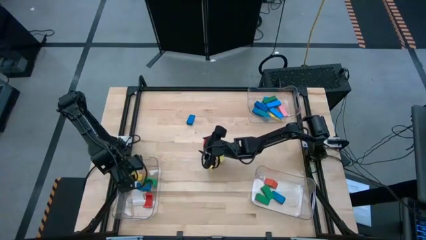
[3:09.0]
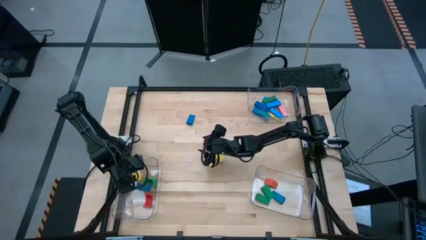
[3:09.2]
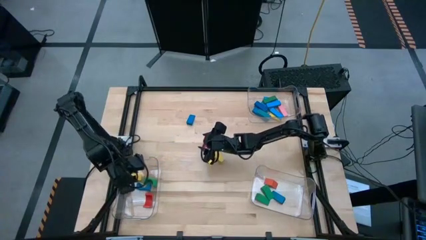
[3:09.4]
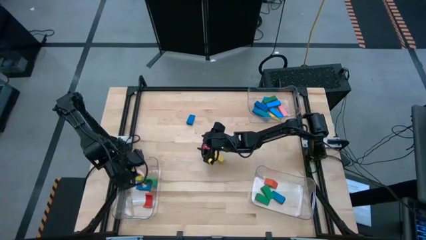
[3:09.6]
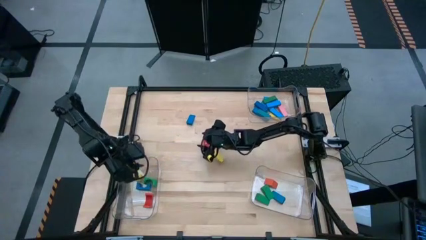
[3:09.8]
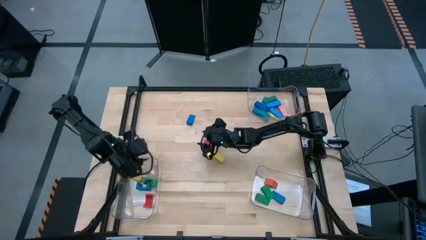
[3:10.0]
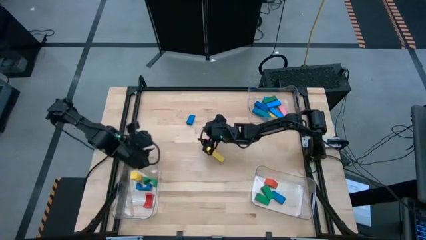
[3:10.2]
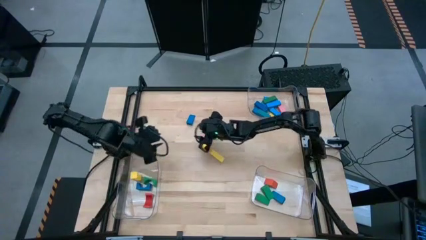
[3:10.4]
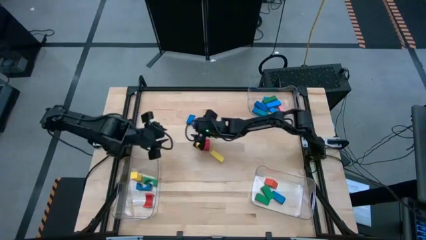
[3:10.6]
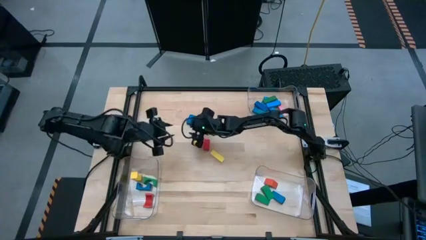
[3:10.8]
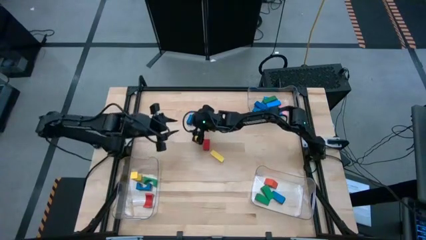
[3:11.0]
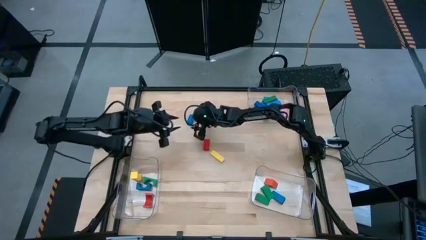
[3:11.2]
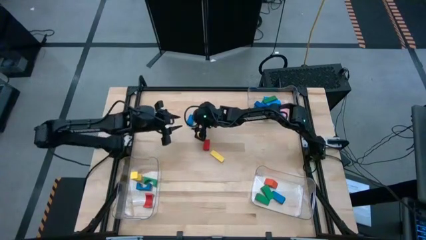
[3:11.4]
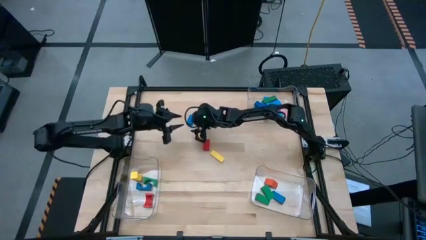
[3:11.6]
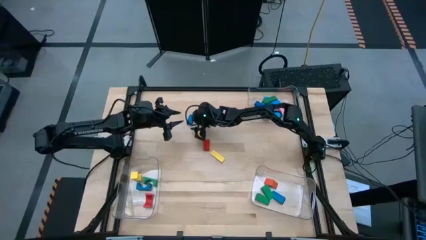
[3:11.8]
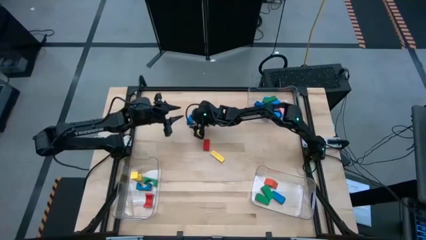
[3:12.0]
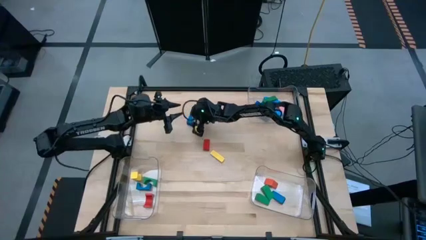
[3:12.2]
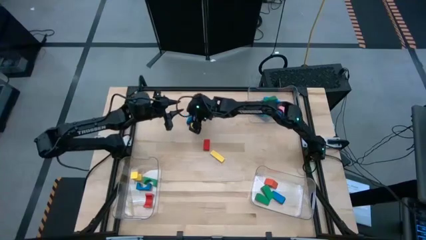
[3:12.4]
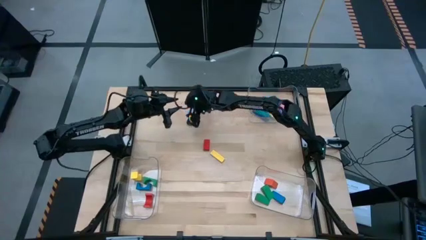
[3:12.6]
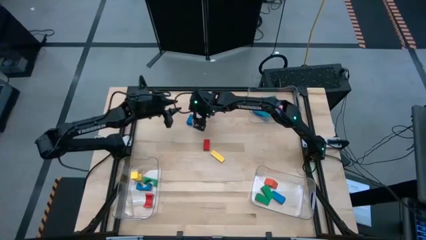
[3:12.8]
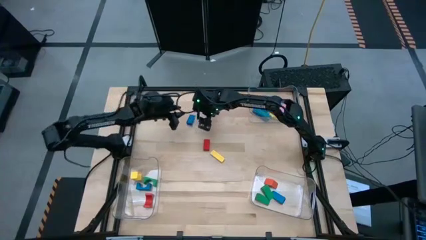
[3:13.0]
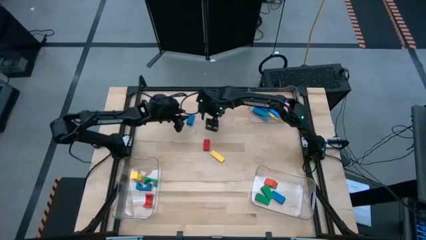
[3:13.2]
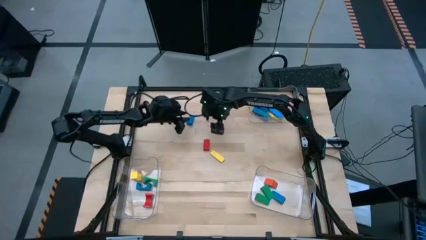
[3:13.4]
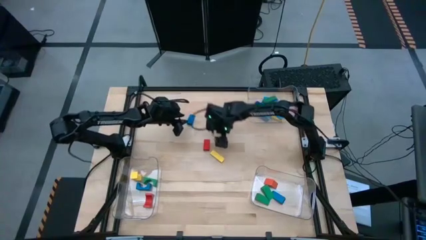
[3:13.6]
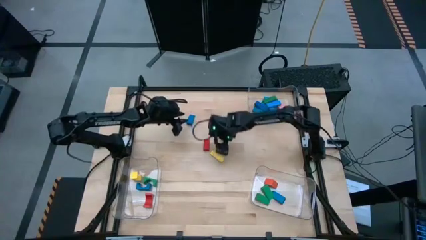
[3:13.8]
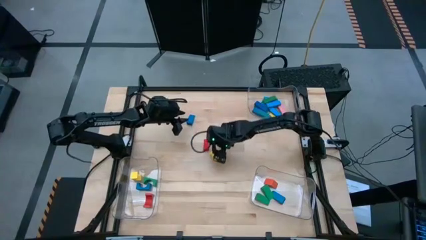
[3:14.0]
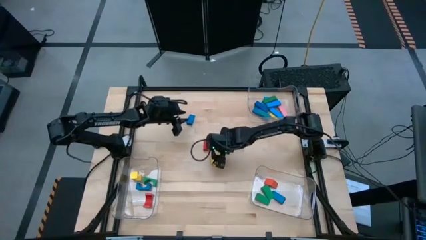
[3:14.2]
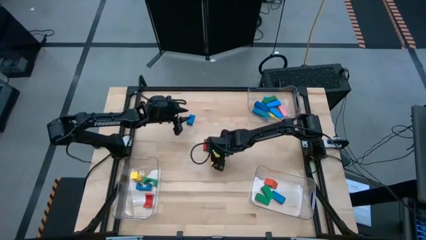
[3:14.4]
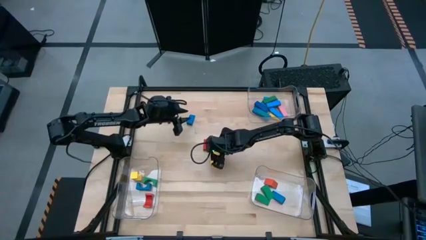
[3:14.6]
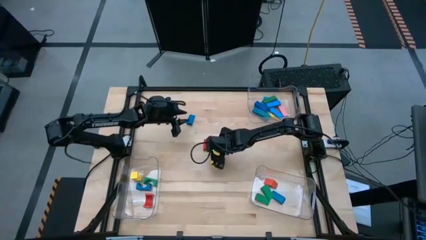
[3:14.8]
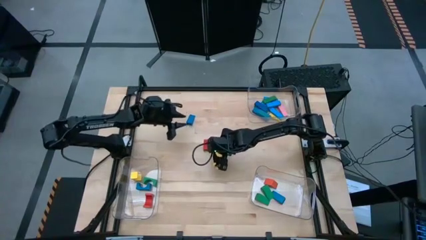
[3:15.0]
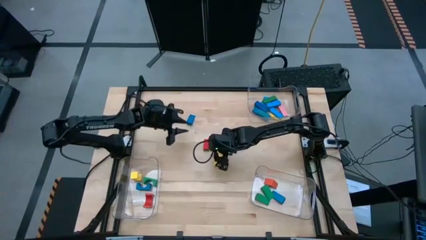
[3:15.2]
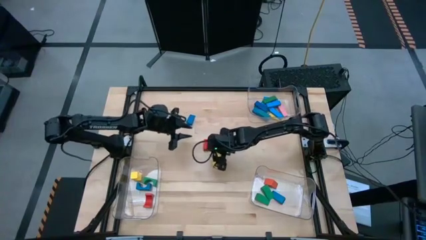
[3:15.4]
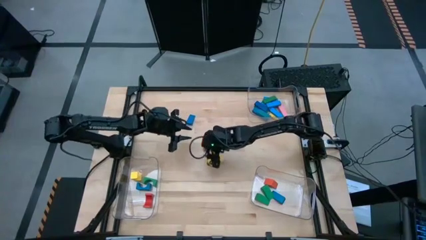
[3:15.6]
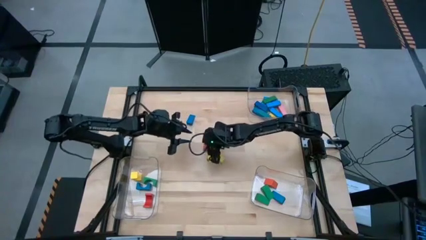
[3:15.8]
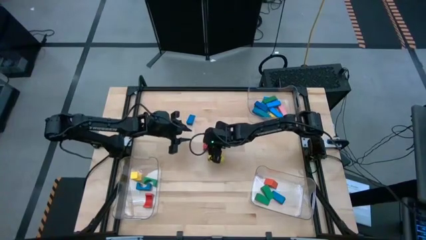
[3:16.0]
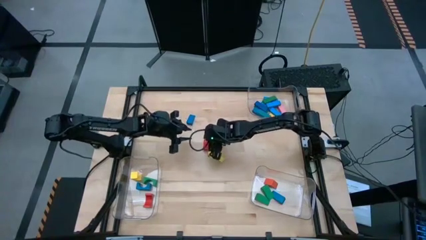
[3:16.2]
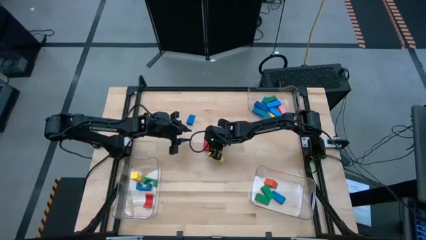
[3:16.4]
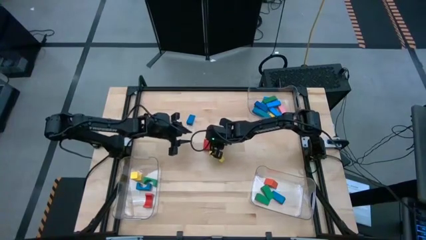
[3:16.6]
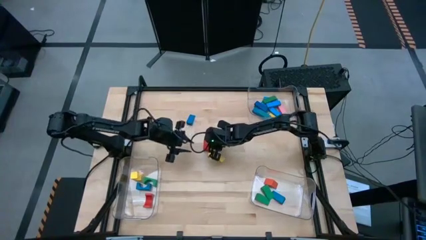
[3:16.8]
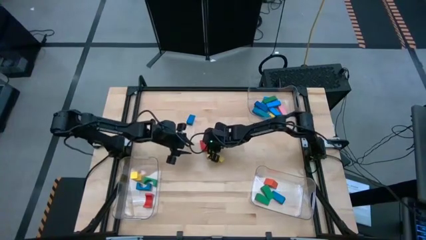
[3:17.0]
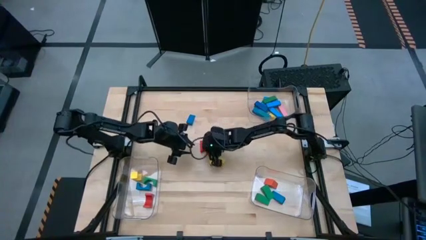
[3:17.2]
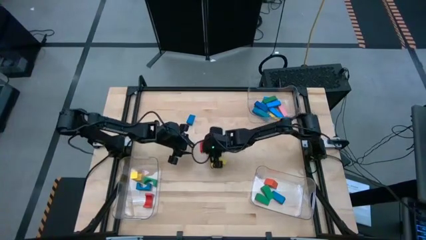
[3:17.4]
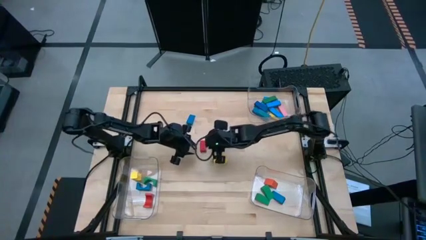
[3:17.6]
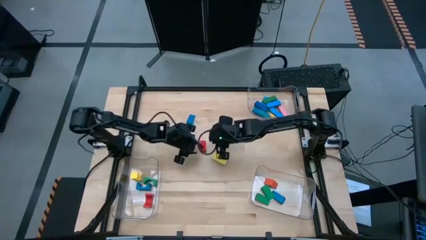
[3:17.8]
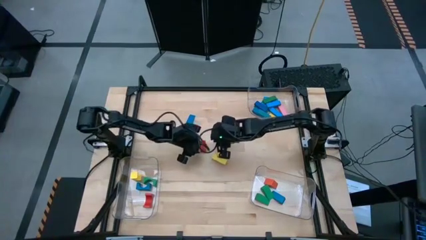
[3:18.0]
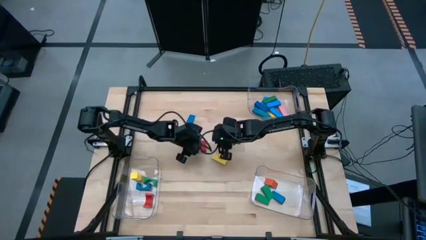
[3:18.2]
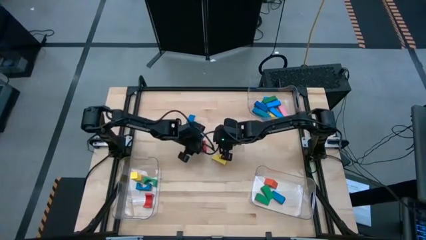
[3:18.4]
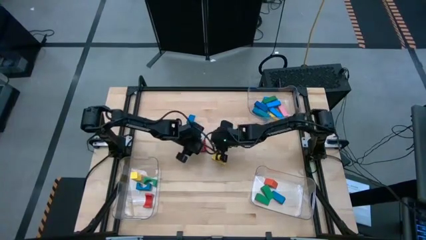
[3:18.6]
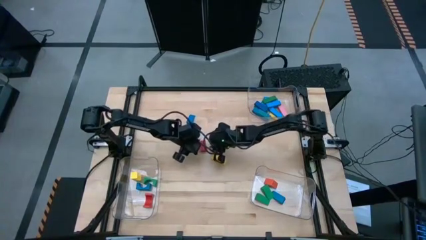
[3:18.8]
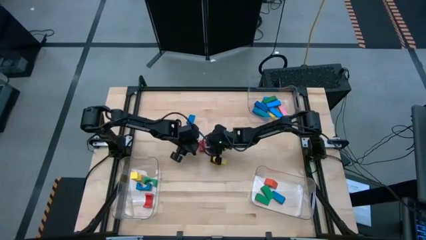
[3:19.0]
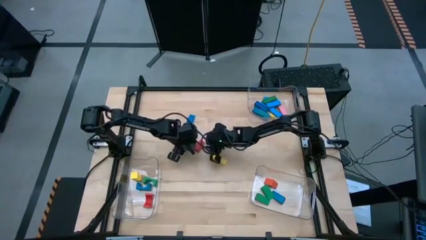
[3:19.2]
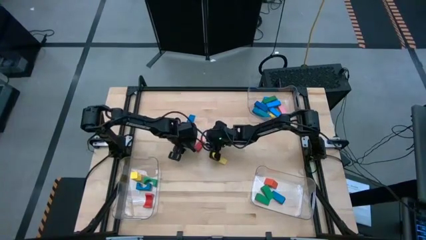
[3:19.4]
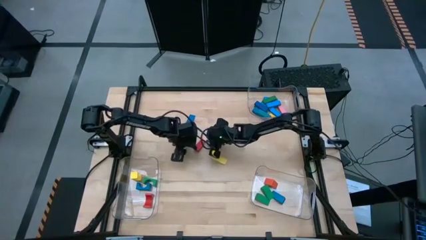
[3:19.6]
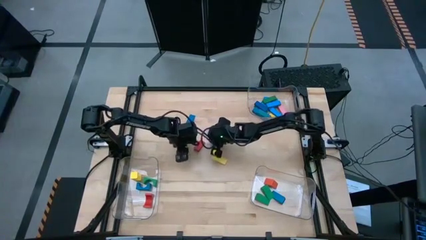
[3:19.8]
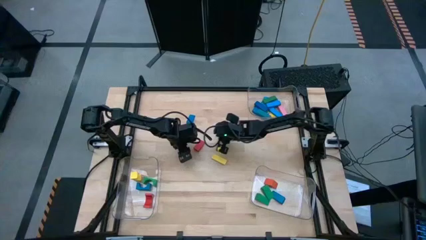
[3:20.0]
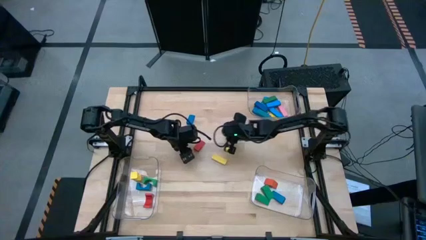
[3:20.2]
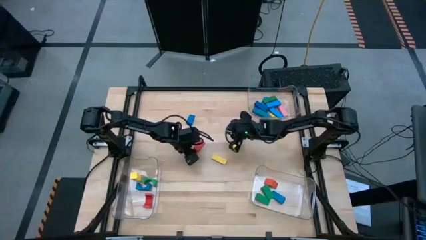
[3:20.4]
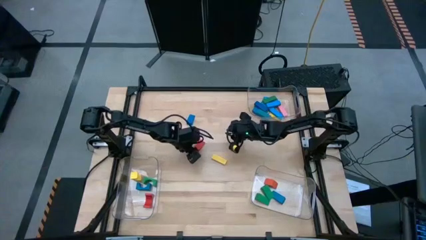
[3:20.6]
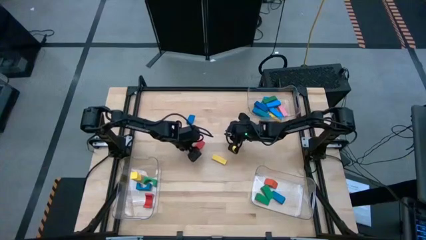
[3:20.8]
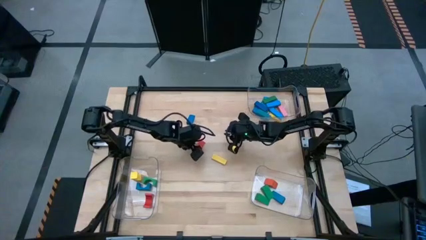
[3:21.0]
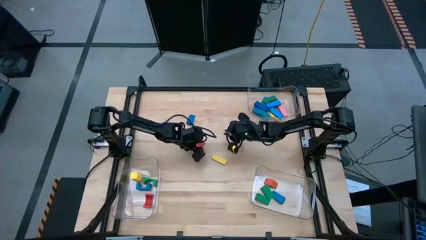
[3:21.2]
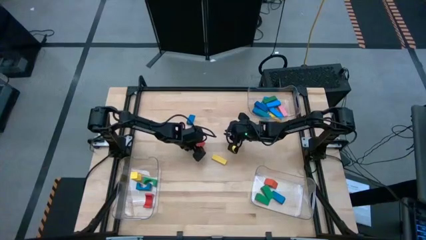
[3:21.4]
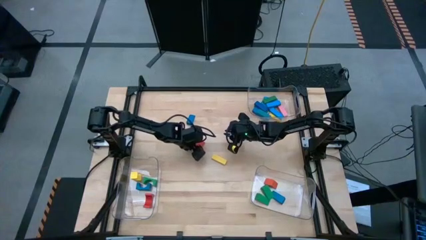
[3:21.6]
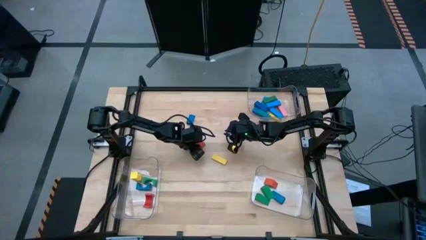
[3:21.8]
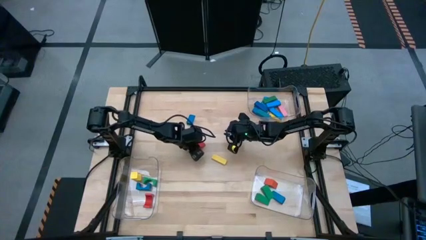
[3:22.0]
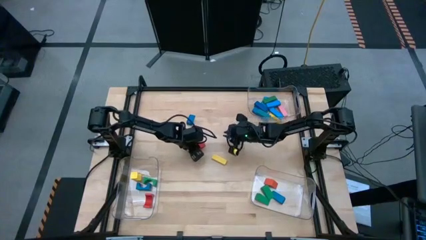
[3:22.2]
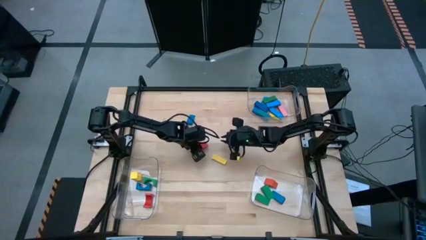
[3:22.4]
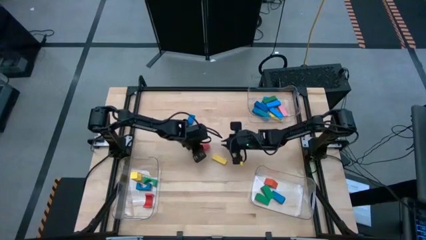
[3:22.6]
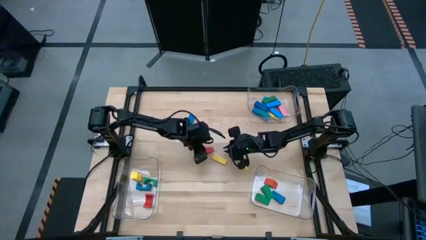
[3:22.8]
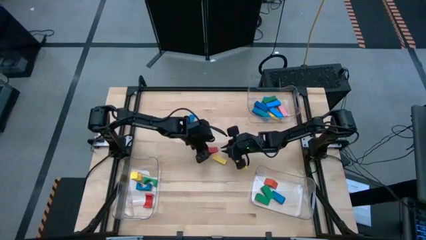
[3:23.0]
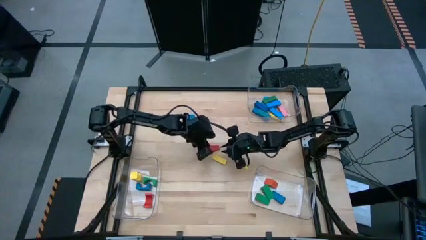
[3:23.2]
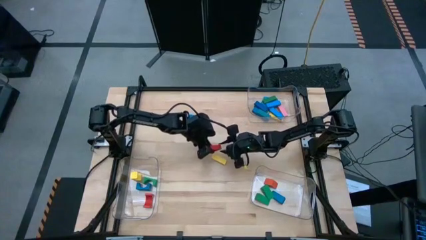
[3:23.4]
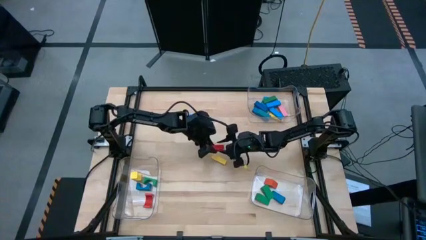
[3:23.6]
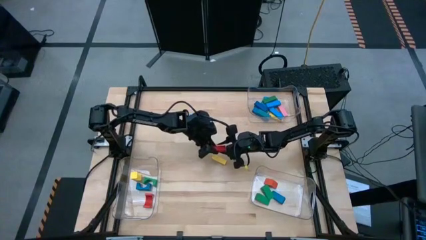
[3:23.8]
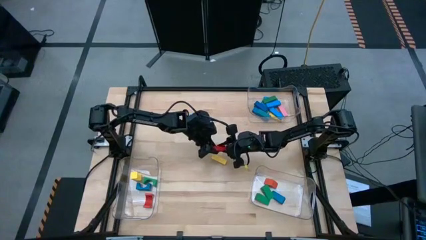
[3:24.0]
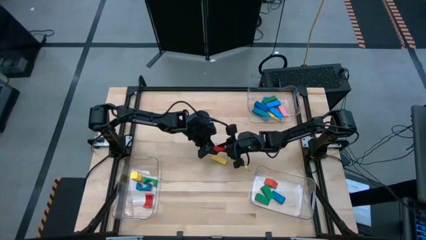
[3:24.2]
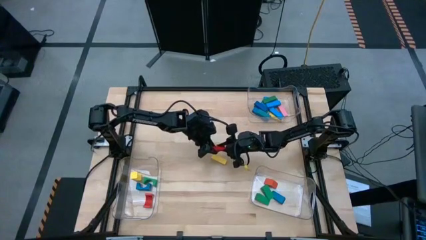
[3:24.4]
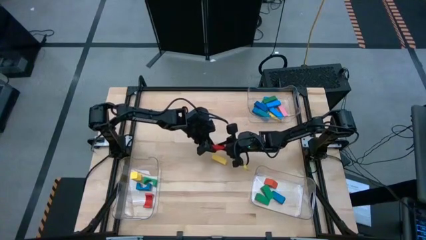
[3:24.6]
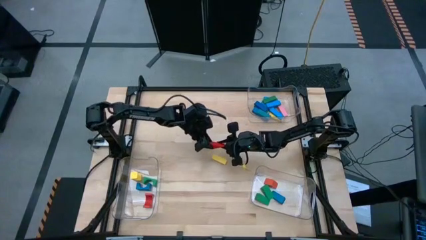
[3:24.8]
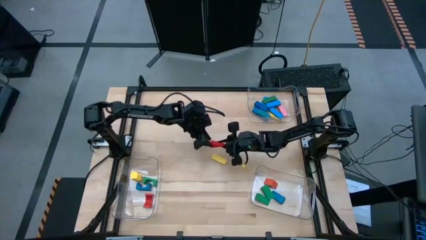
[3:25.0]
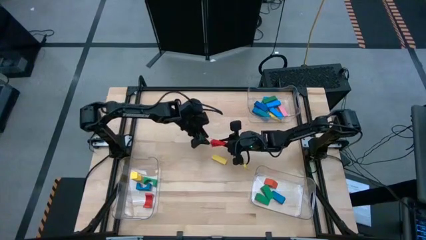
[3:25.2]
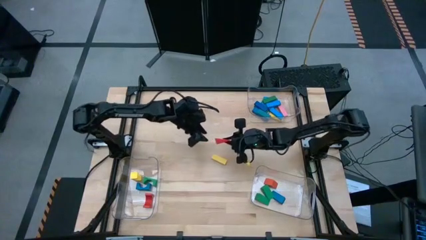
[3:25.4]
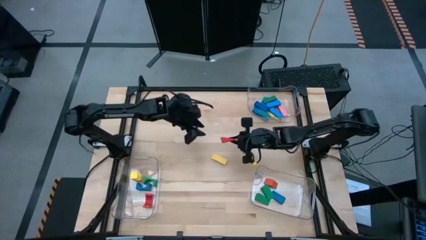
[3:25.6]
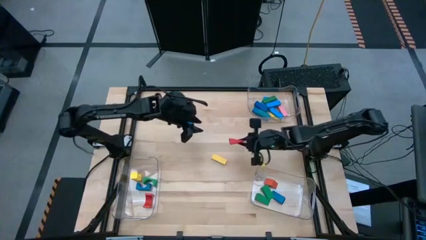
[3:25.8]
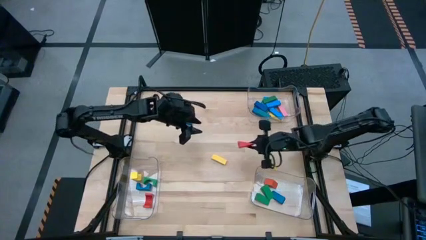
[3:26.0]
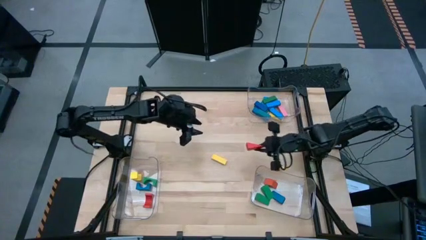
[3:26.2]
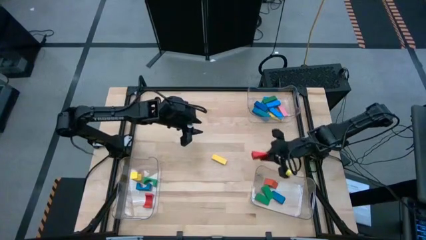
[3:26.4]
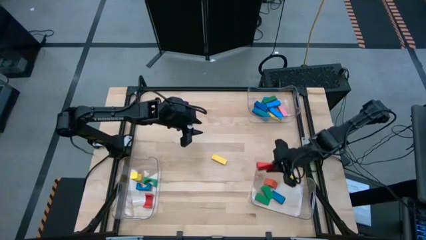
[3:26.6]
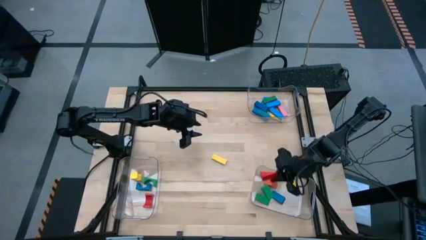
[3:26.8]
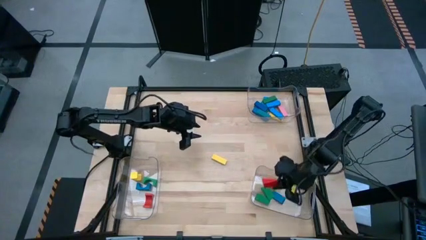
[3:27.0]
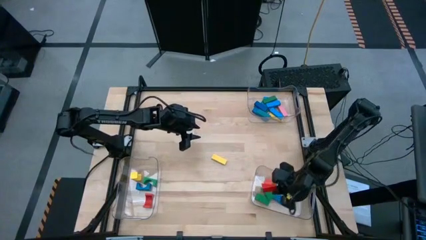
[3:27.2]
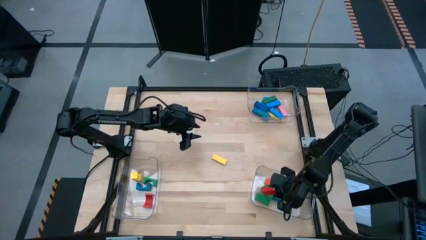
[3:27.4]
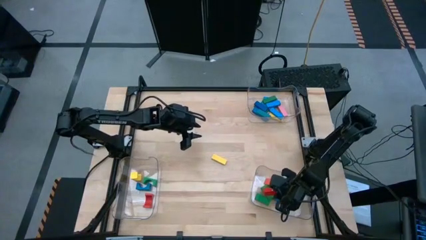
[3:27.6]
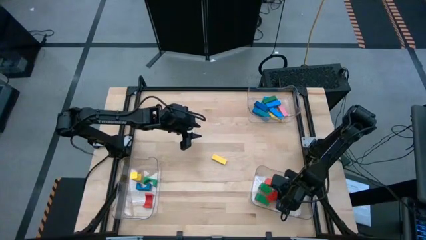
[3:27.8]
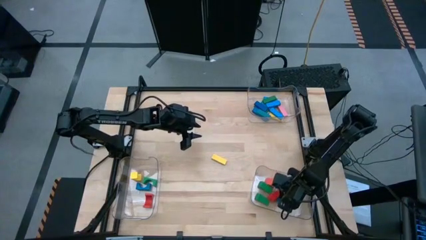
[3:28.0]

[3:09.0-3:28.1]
Task: Sort blocks by size
Put the red triangle block into the bottom right transparent bin
